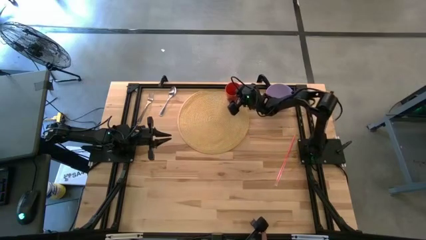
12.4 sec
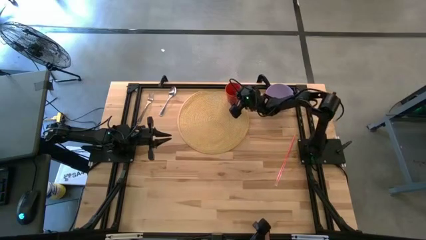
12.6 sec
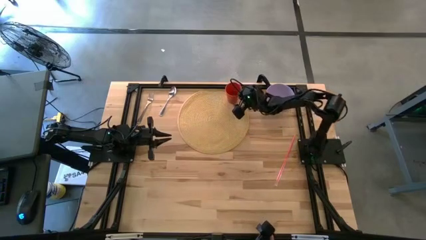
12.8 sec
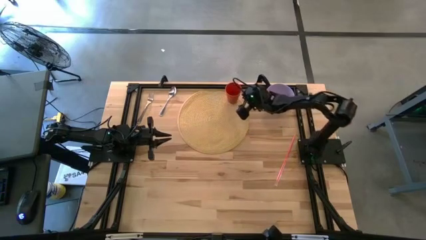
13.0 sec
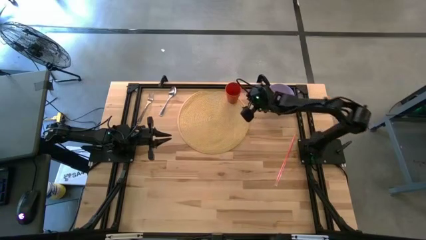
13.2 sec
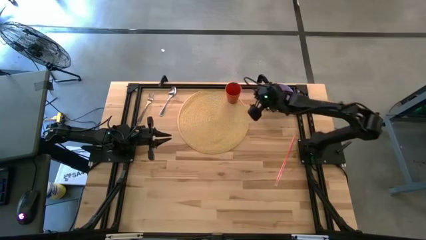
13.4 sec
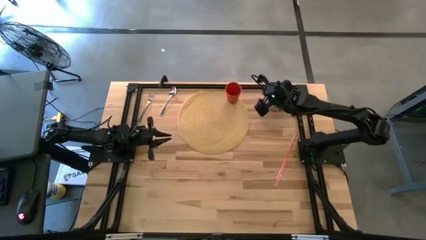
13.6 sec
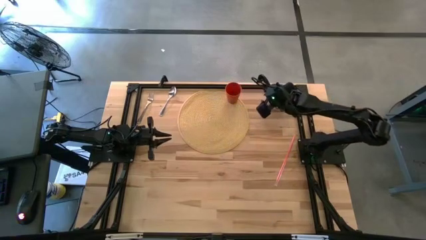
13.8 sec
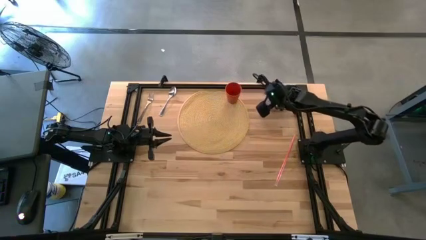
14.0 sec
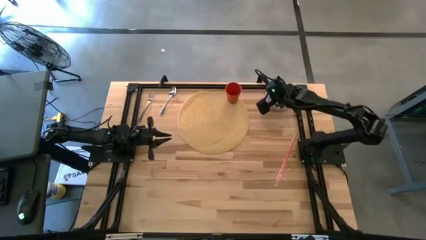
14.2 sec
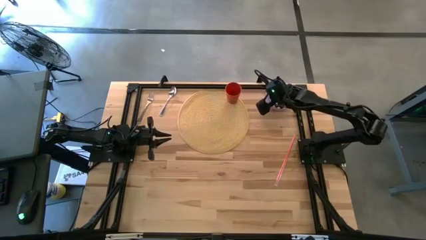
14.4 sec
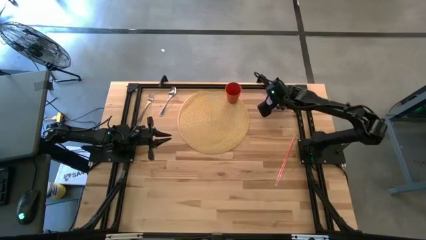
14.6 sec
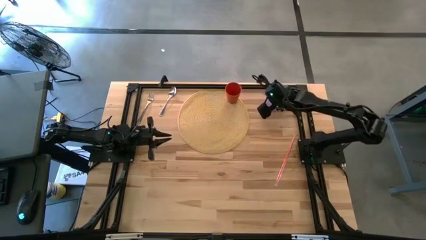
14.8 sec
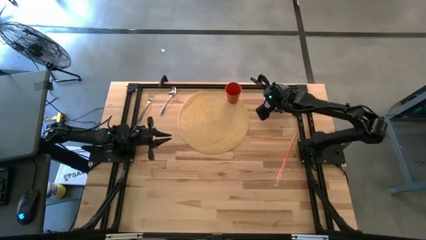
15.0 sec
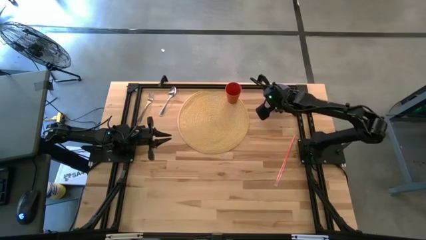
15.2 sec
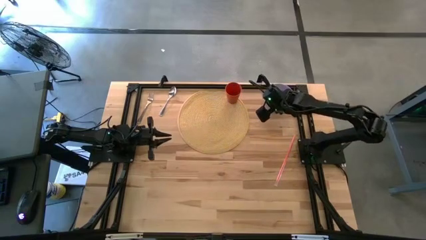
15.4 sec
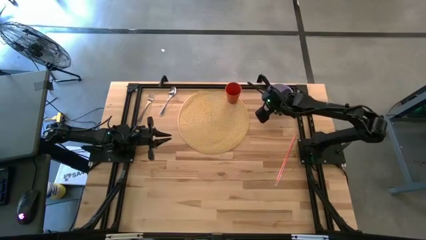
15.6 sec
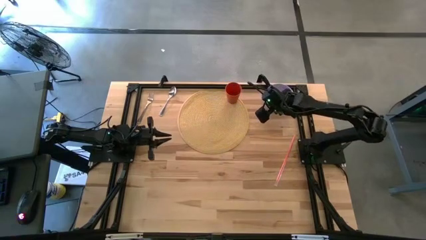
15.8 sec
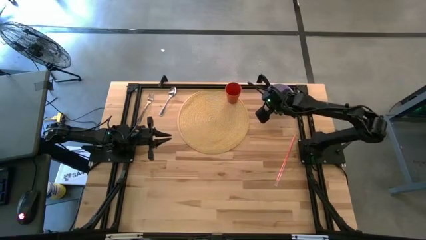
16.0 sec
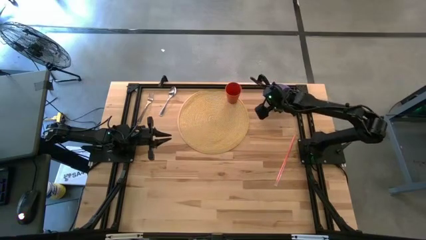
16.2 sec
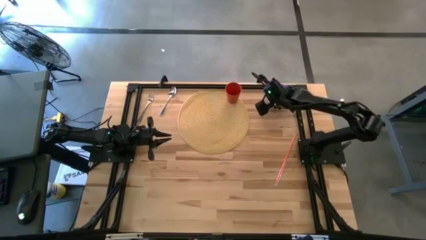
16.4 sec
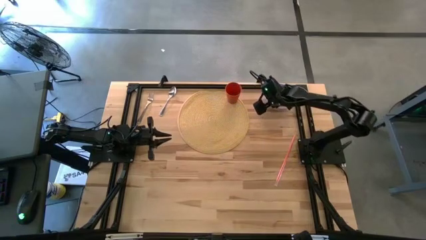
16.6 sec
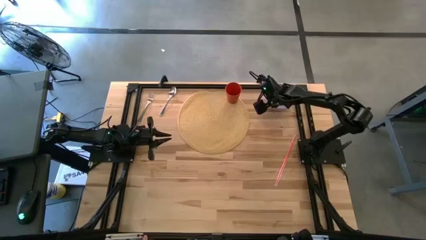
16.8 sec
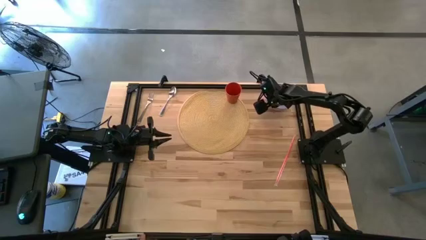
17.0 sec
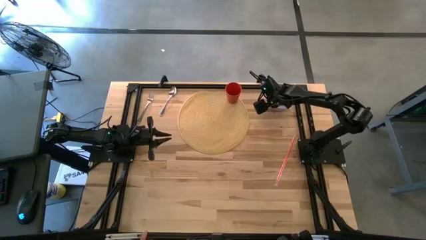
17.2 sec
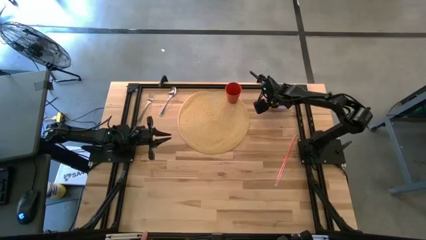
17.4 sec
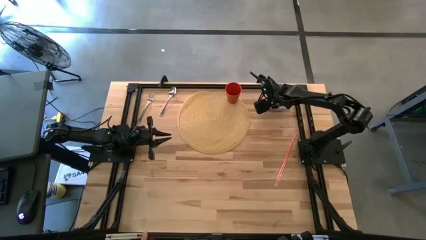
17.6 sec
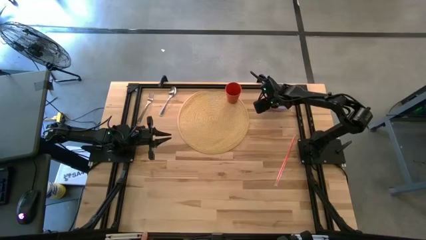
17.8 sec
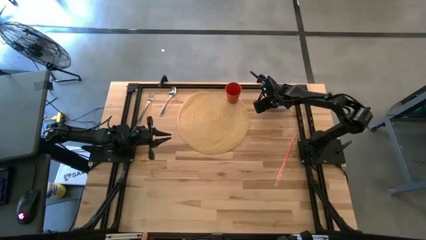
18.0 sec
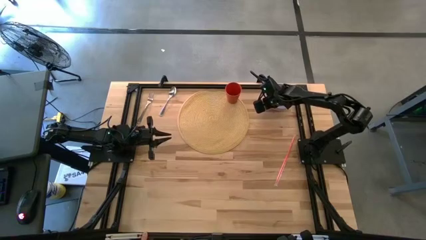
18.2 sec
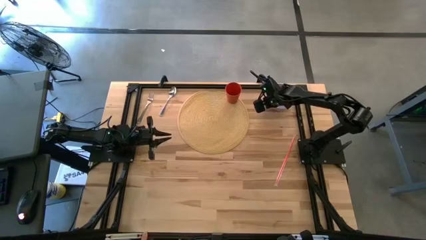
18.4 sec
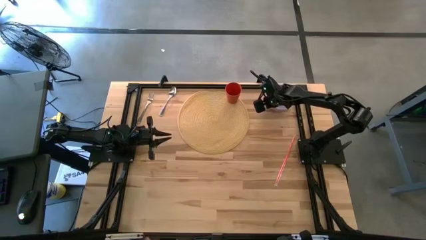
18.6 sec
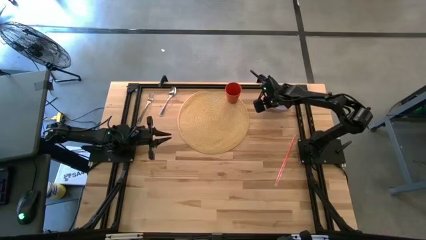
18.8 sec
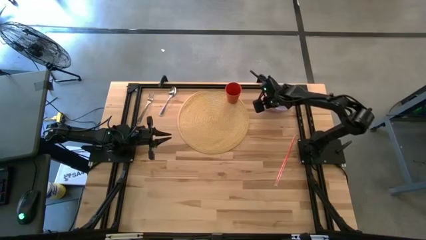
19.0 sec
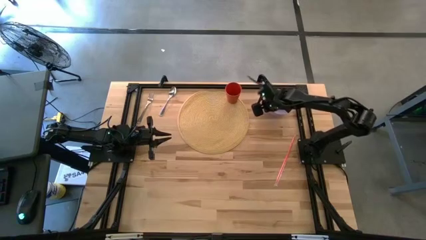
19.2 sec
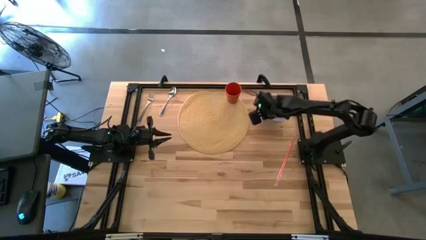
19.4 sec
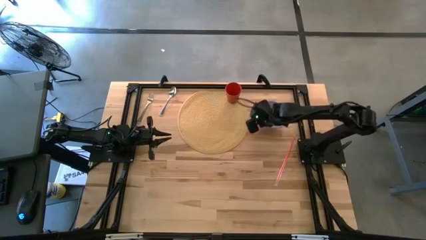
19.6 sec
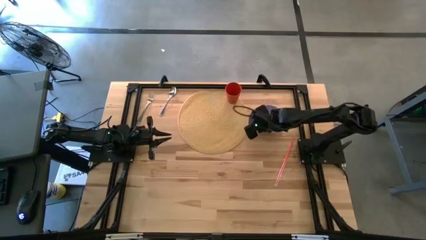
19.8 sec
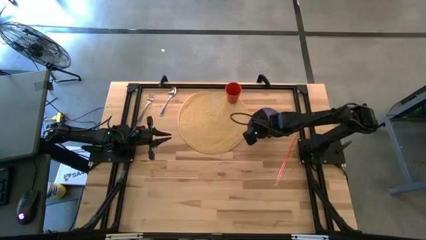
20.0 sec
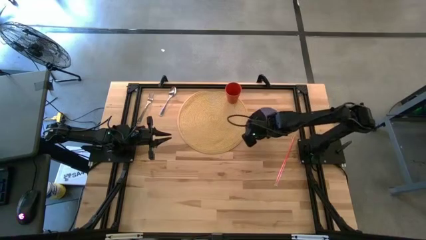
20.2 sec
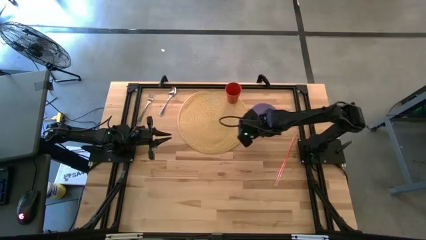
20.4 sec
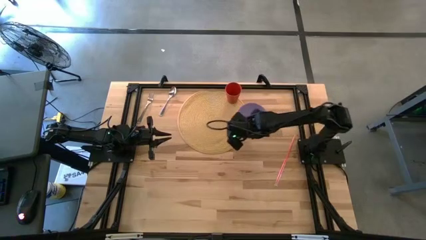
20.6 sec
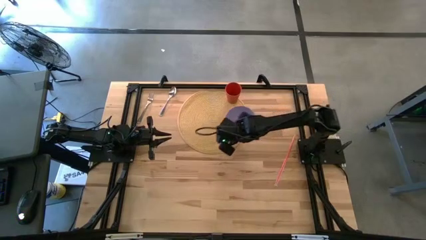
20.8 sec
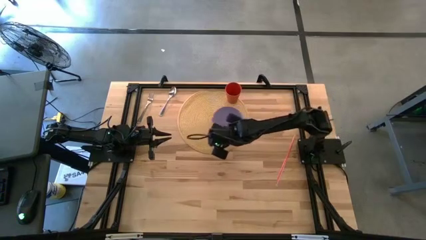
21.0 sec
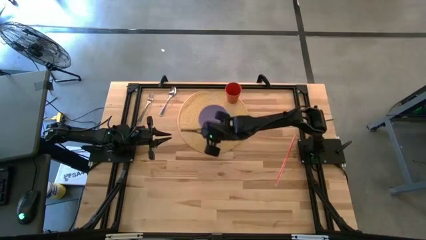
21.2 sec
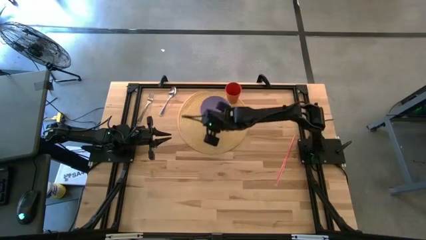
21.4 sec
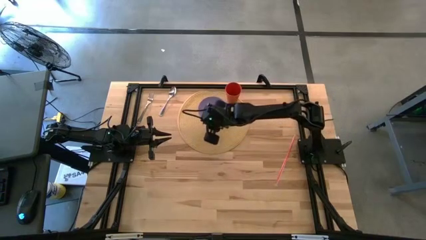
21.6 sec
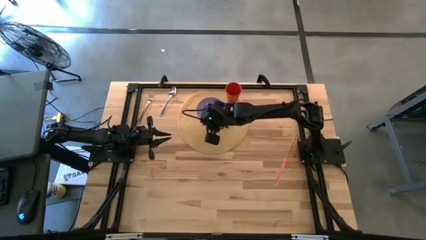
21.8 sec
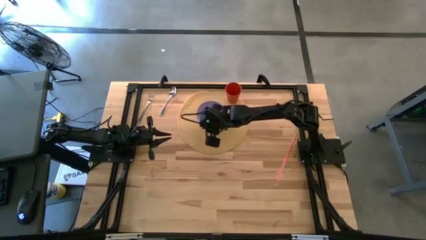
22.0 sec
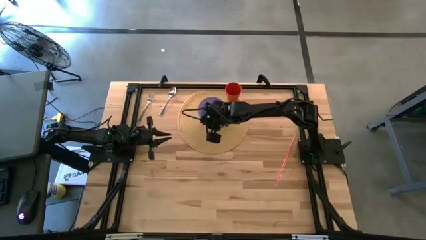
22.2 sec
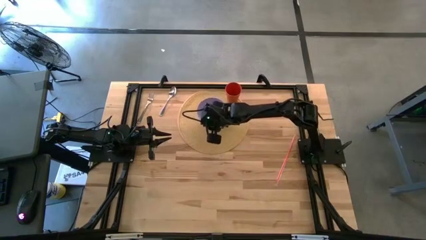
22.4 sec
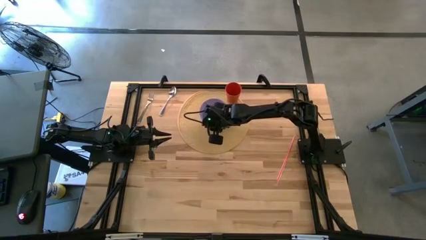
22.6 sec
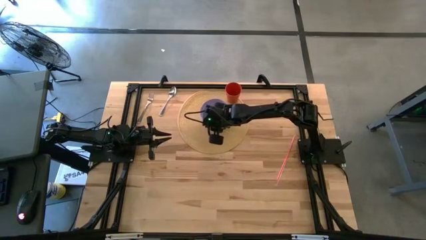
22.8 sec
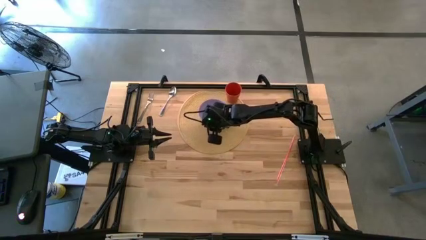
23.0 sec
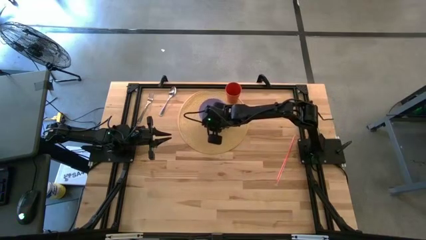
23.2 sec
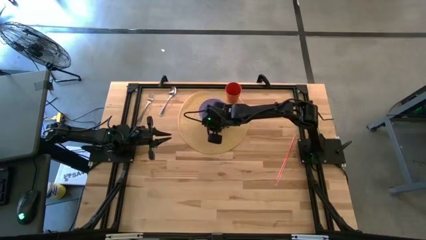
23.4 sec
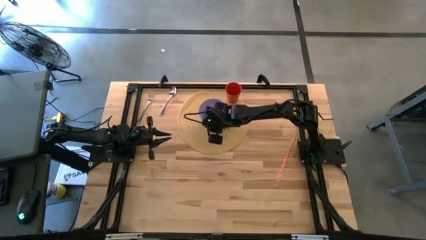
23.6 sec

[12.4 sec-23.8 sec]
Task: Pick & Place Utensil
Put the purple bowl on the brown mat to the bottom left of the orange cup

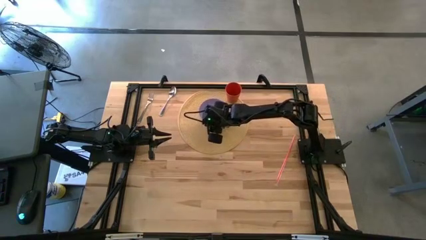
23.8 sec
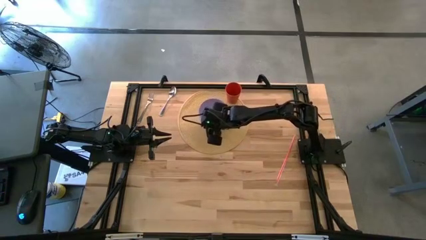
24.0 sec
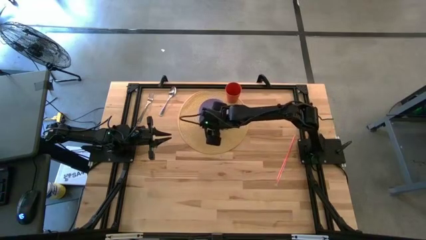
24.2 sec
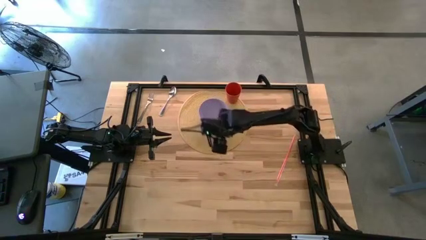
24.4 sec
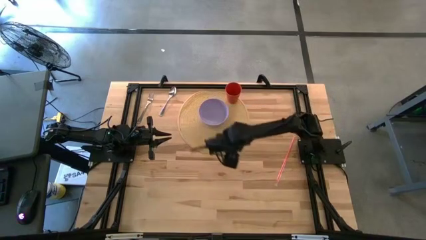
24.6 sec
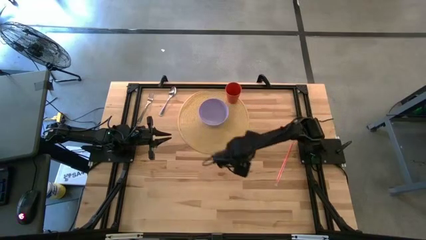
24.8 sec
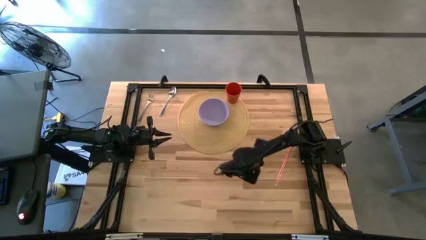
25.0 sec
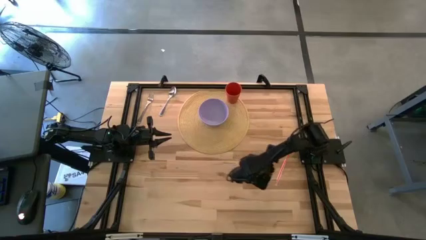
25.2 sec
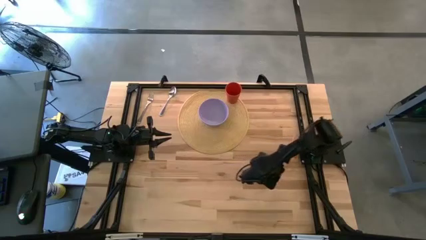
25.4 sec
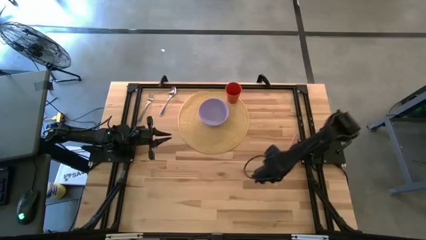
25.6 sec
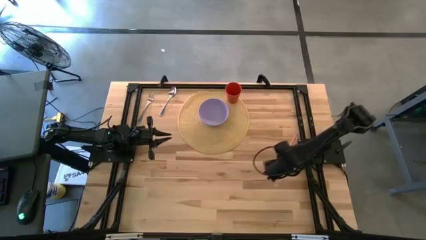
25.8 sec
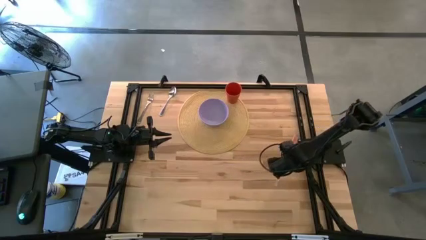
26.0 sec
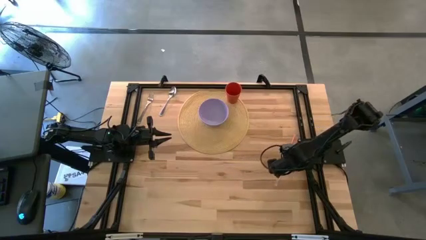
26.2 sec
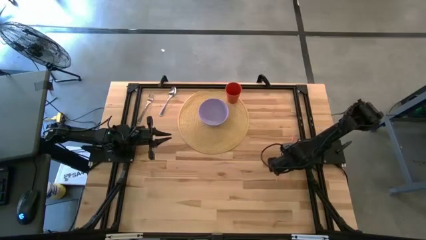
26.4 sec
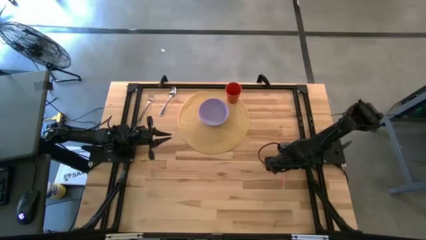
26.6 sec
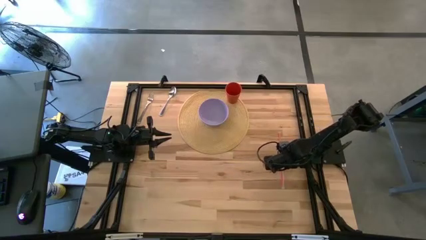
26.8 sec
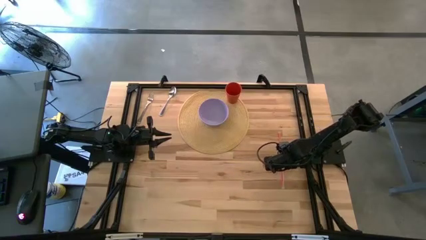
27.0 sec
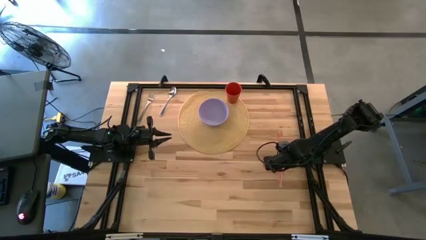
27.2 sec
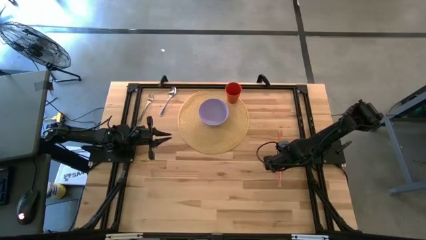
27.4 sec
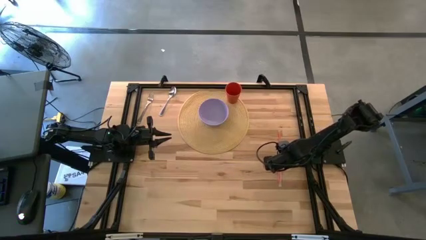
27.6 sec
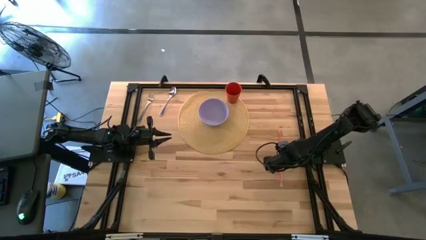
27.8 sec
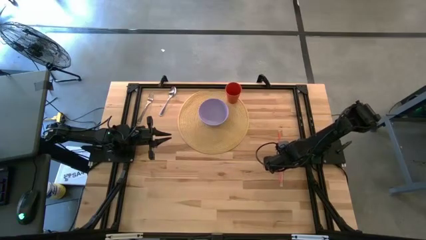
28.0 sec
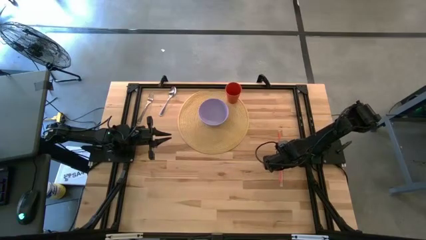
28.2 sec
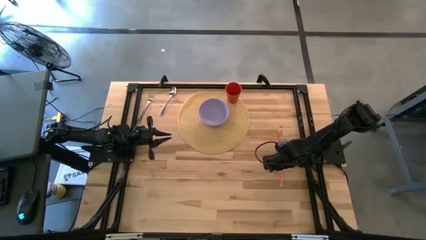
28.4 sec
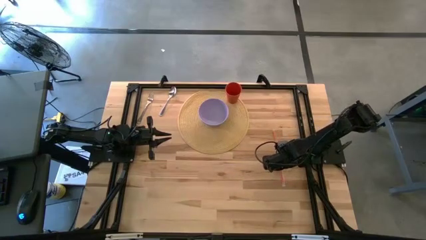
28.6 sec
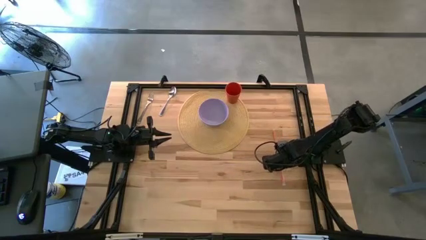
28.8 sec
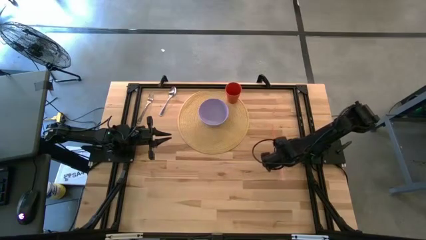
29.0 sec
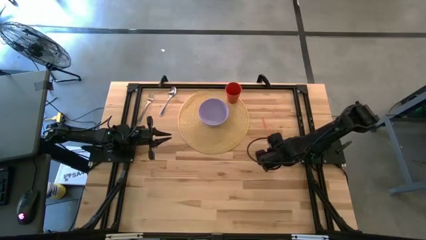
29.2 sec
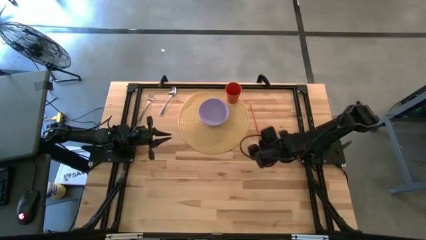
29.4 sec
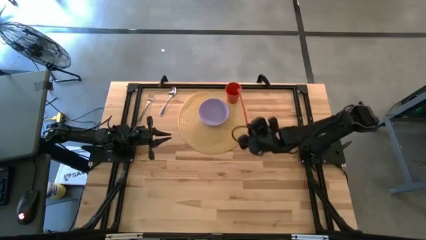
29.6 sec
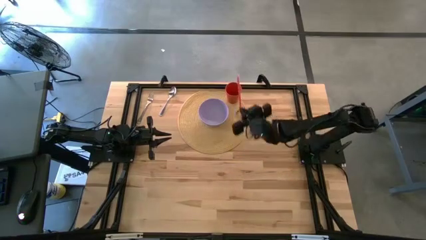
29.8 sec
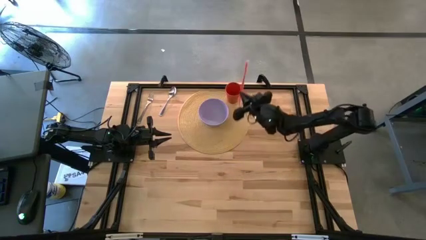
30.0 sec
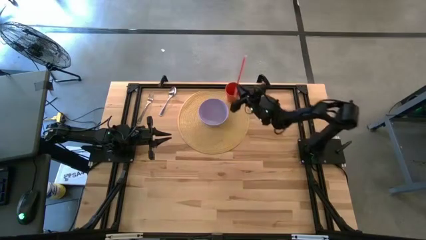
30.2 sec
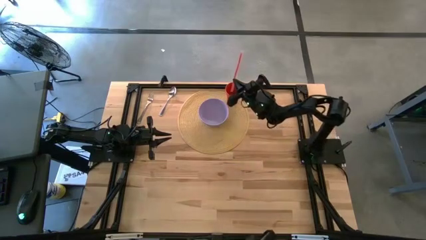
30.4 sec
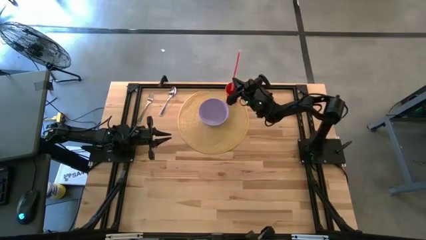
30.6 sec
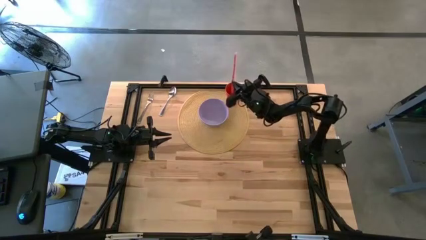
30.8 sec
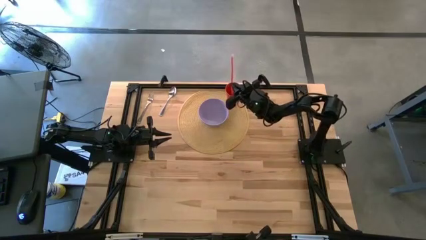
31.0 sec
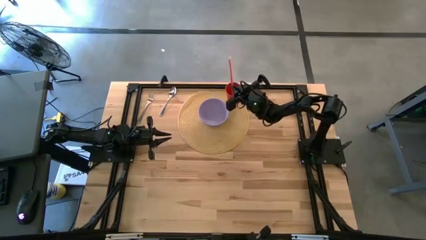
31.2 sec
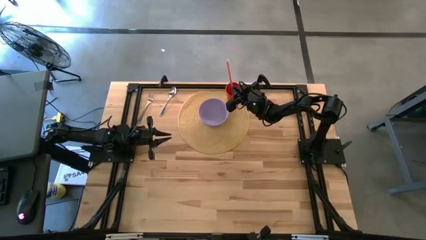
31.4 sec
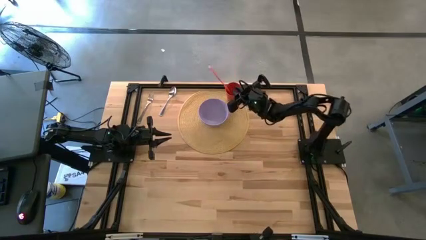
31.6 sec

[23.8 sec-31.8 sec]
Put the orange straw in the orange cup
